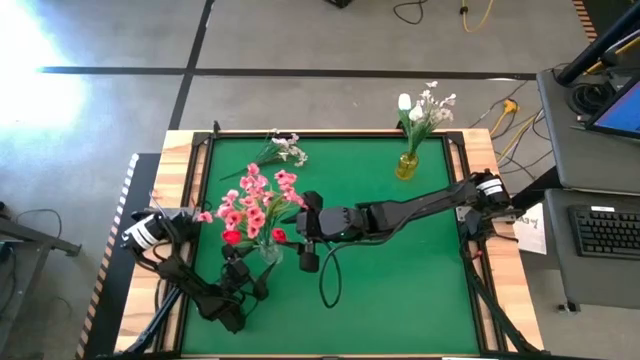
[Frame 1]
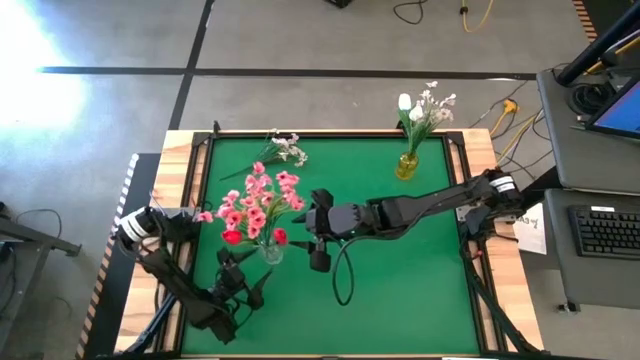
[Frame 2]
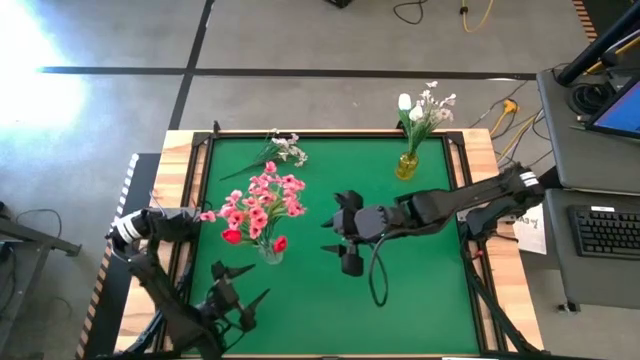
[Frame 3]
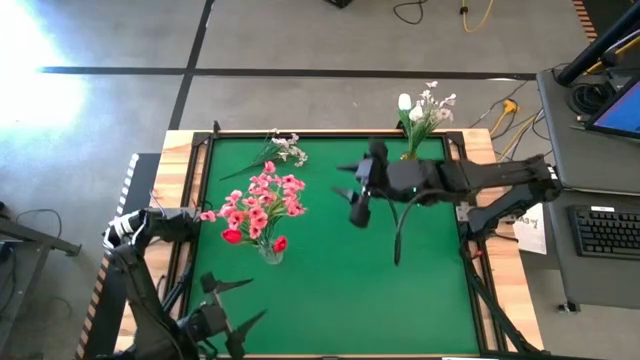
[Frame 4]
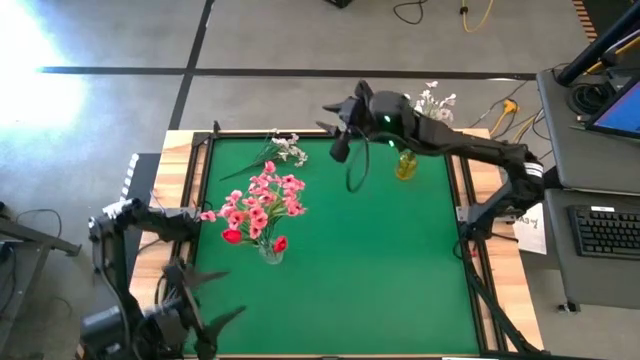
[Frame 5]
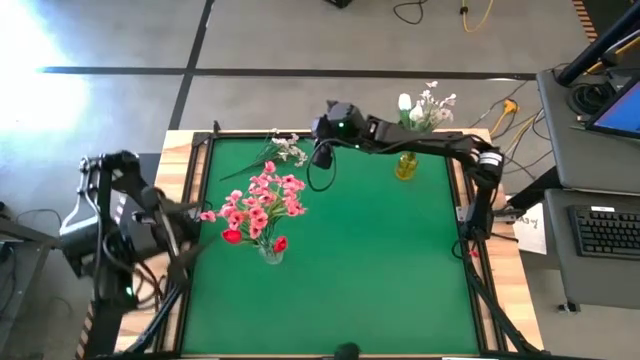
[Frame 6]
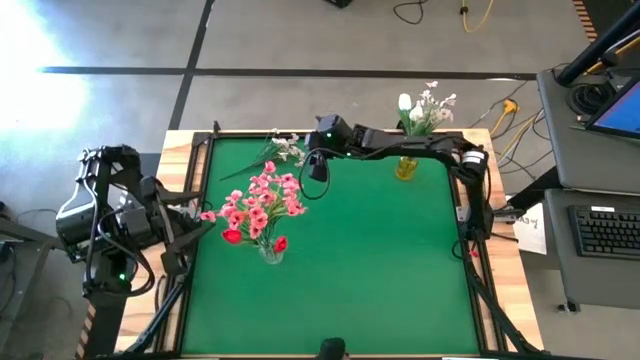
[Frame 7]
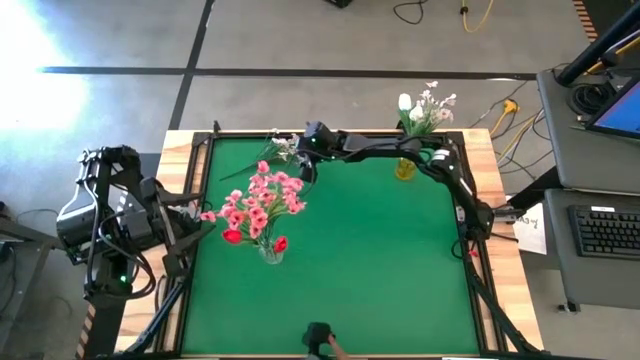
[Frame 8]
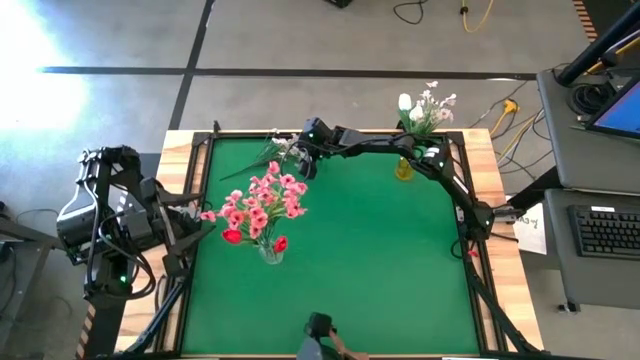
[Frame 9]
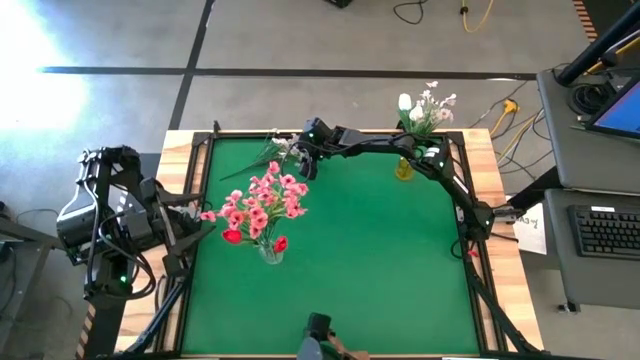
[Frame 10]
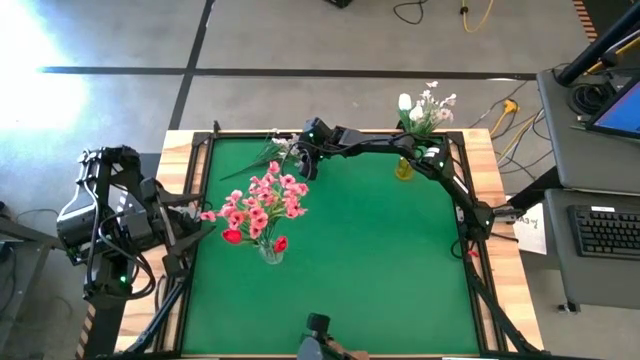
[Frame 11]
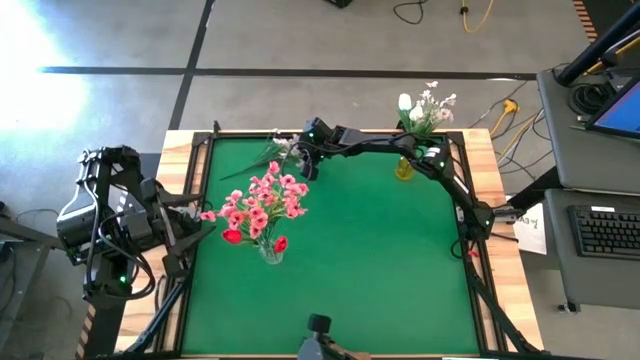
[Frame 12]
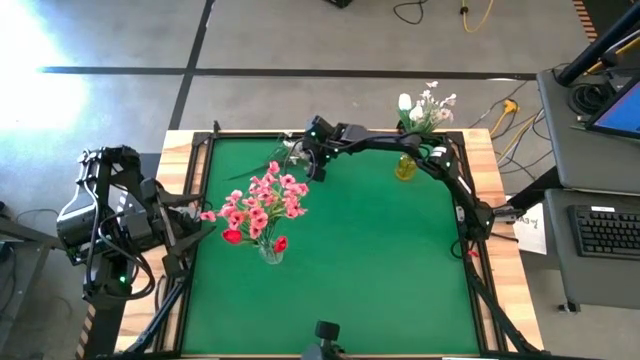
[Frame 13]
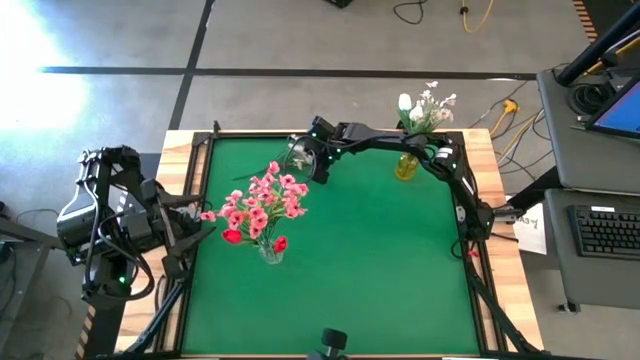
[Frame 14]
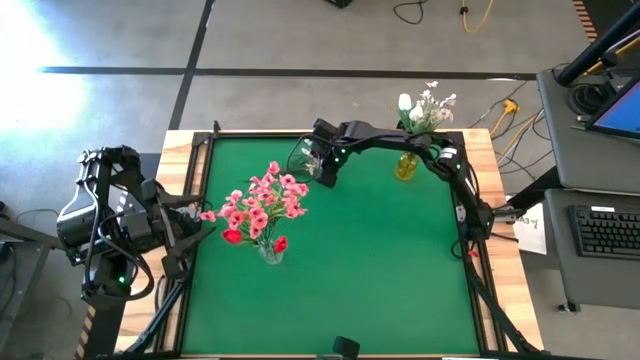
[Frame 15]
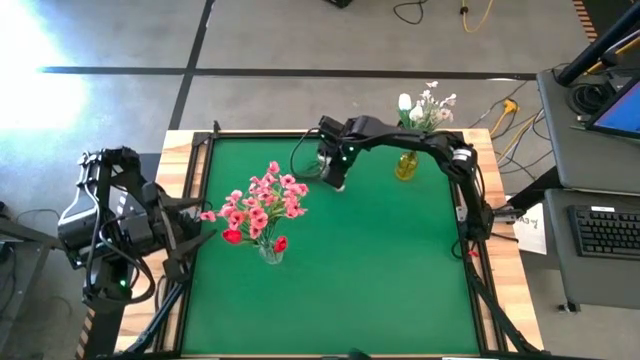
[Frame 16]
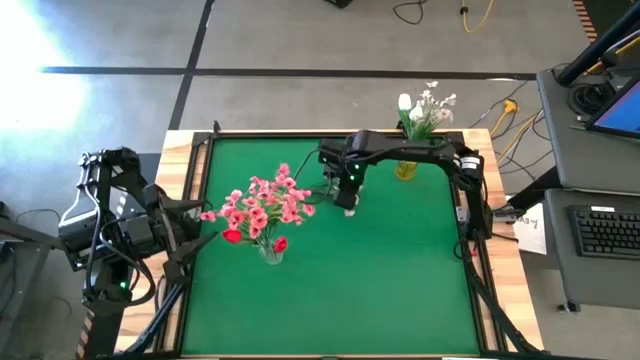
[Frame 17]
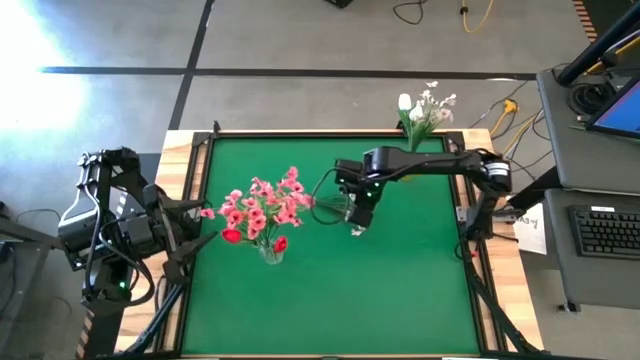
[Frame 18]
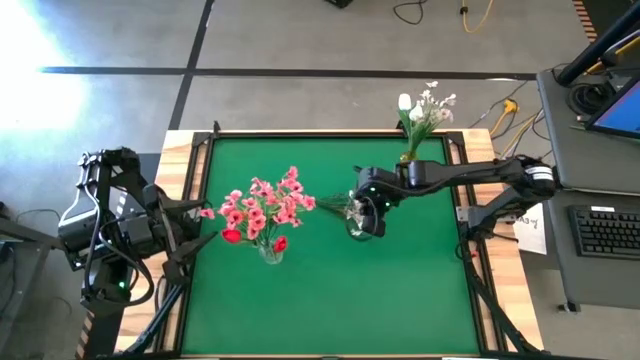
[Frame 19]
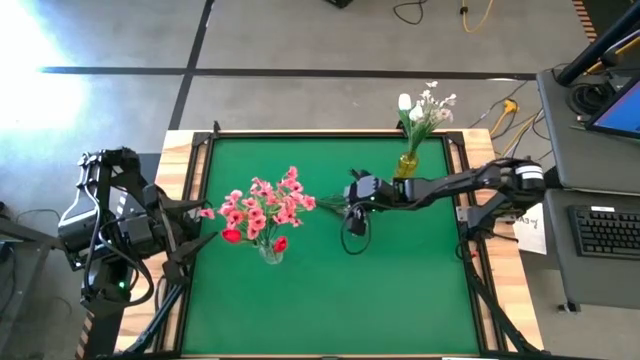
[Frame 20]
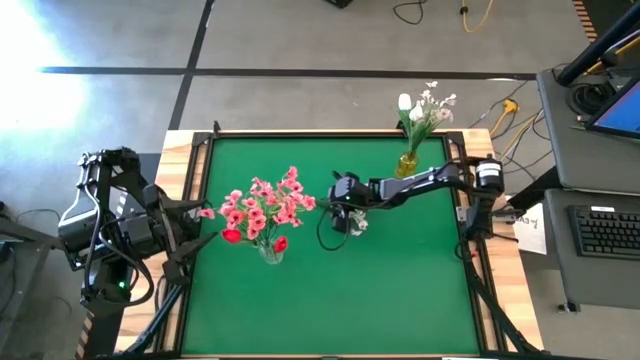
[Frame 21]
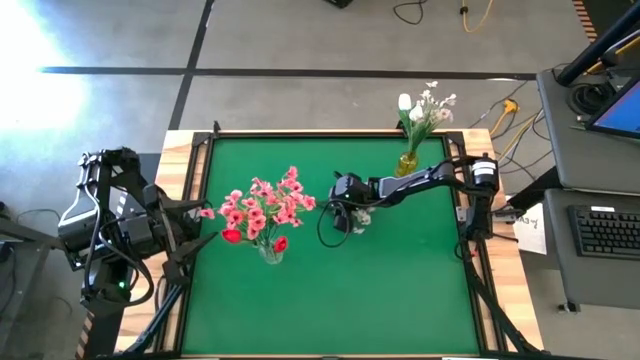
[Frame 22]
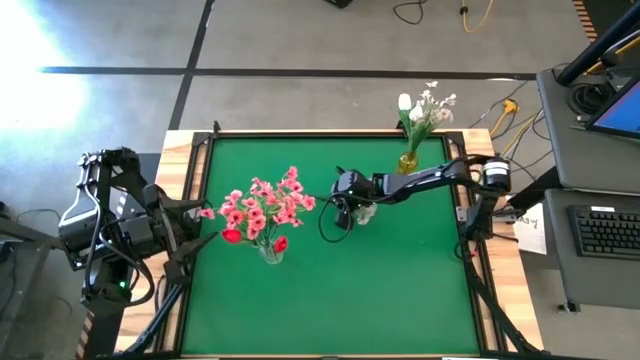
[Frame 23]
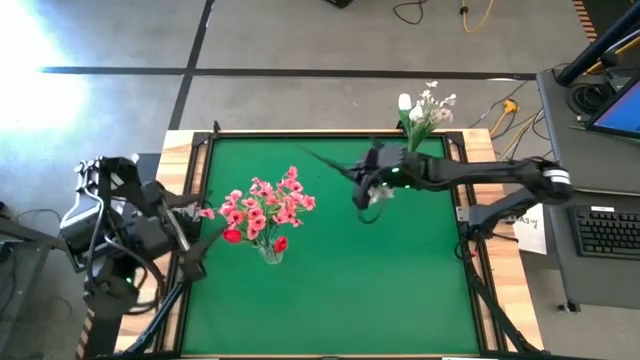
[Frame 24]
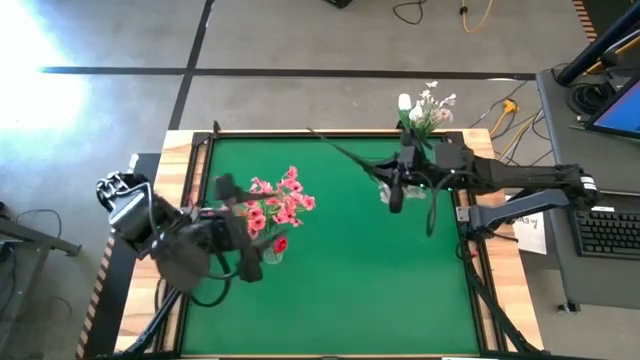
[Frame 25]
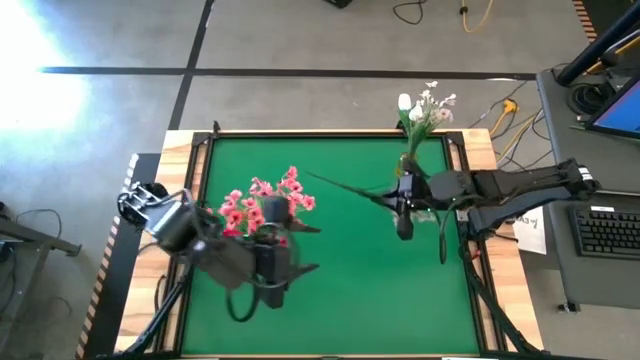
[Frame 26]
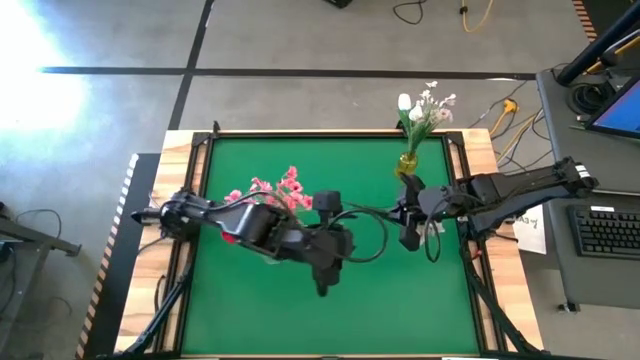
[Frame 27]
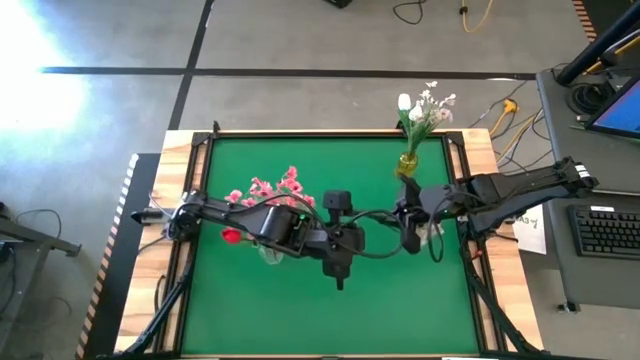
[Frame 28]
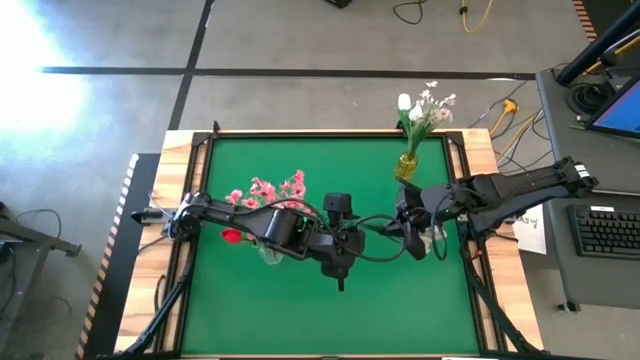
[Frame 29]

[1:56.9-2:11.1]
Task: Sort flowers into vase by color
Put the white flower into the transparent vase

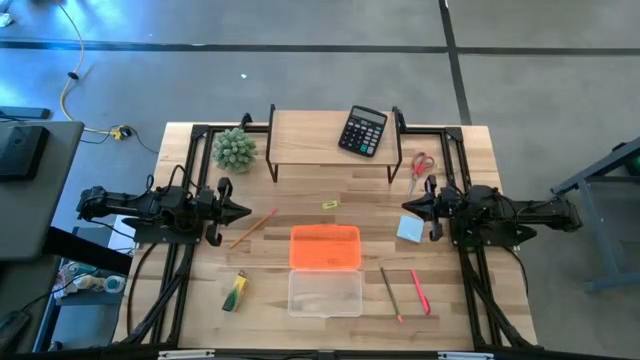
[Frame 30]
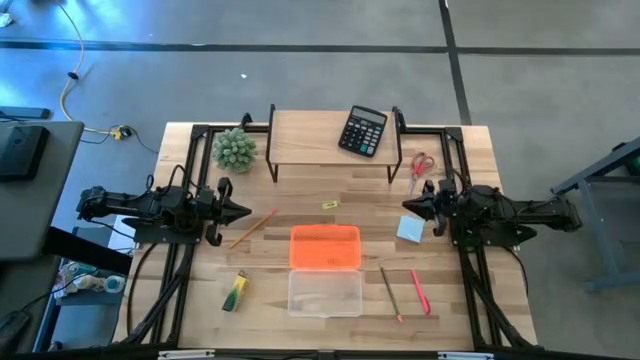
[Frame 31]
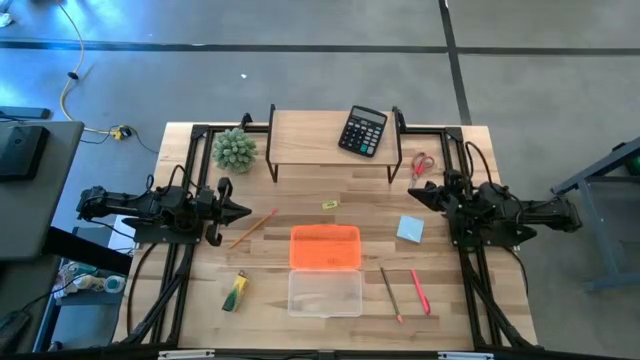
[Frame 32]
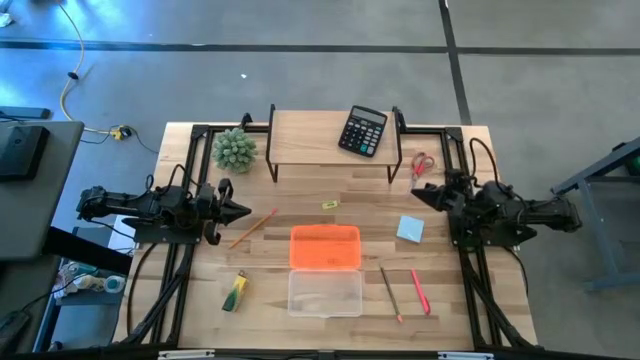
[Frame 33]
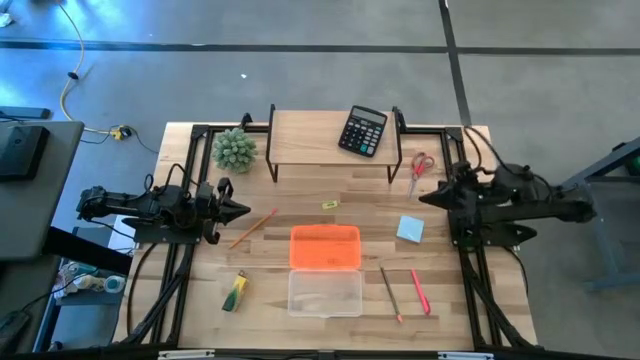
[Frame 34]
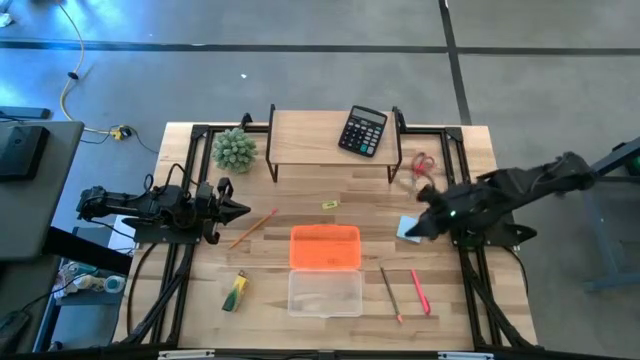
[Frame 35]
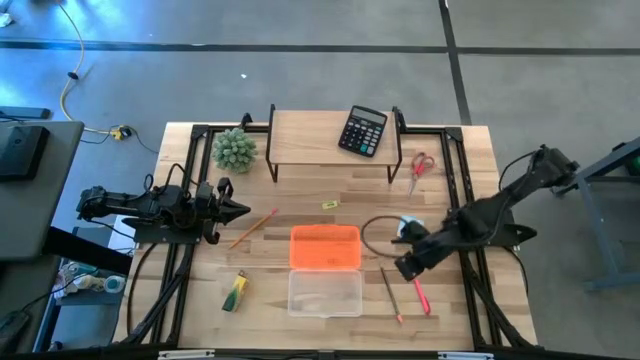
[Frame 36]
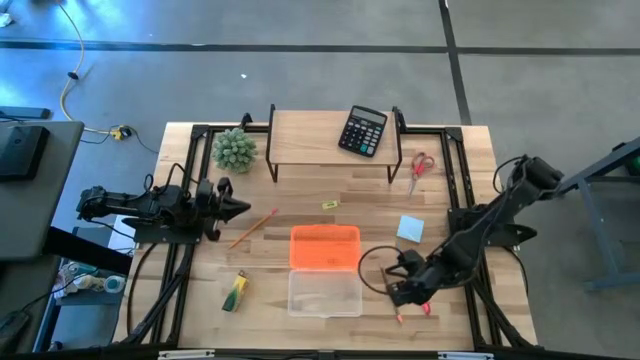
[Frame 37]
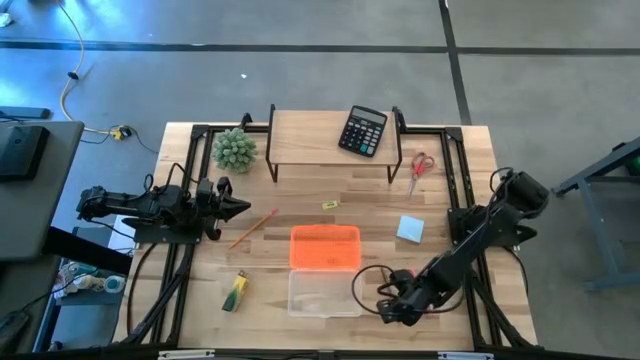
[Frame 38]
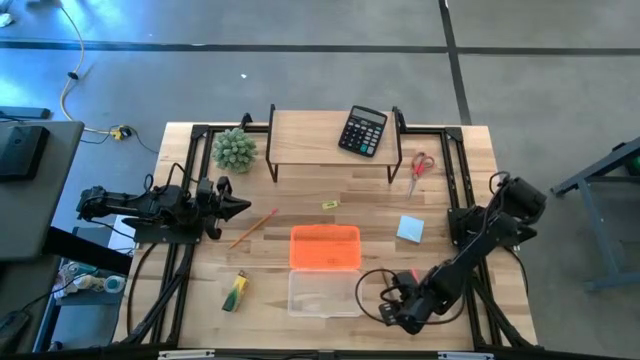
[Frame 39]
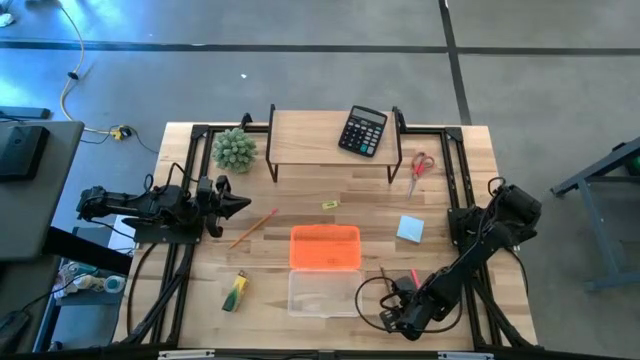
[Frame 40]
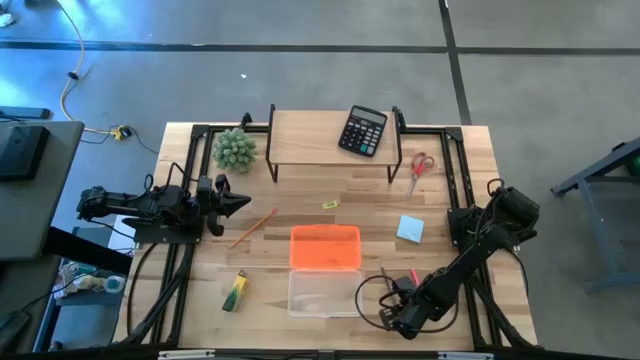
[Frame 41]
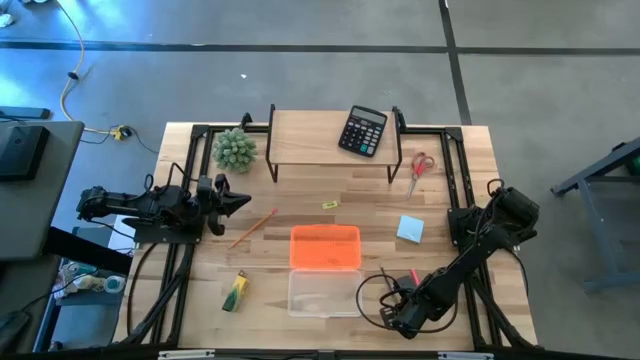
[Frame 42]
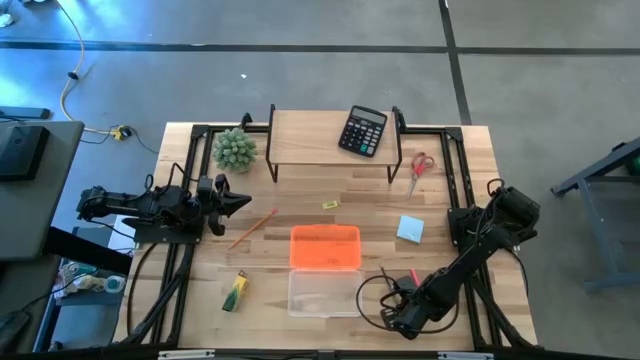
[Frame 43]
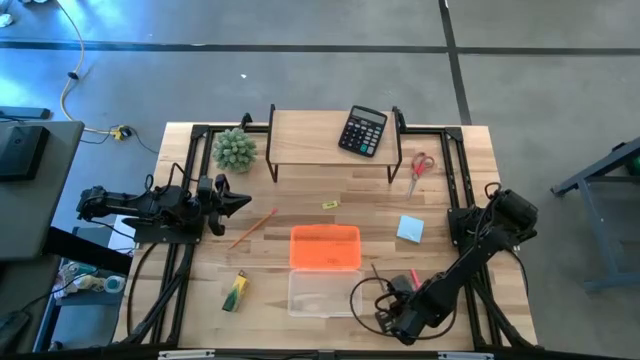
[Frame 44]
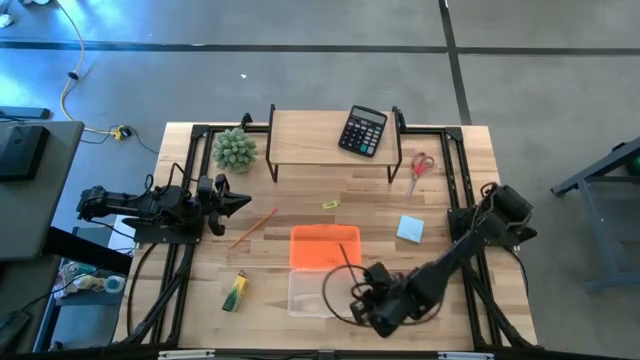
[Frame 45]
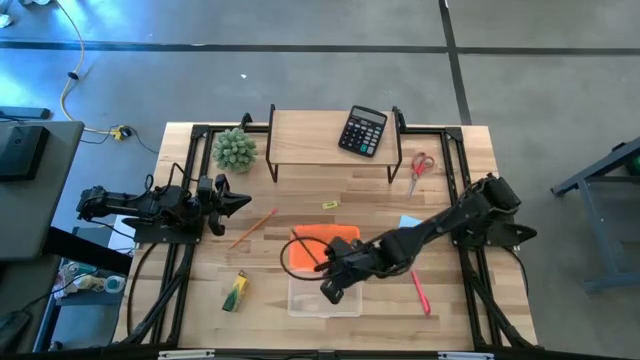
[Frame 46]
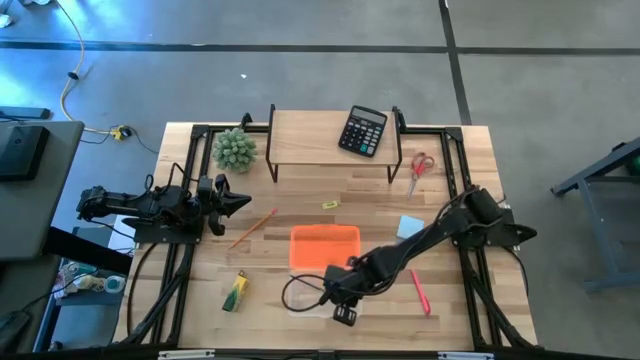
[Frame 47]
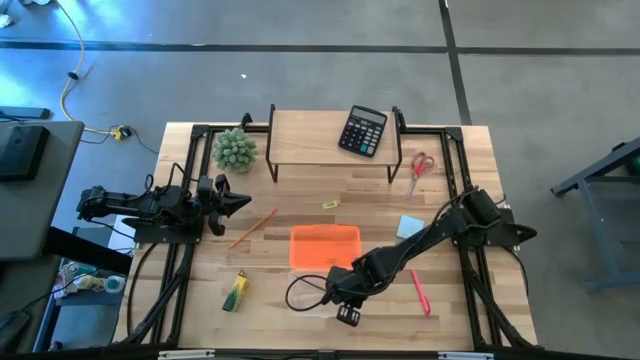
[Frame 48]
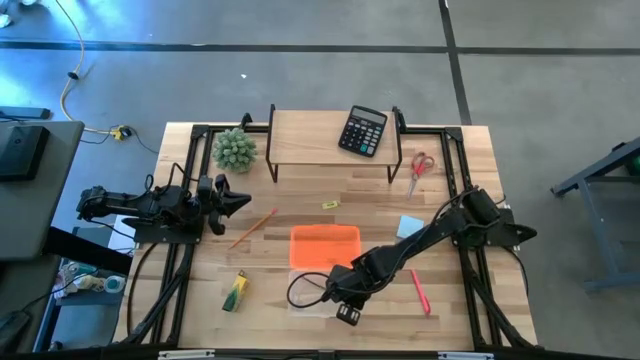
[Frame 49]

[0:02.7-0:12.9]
Task: Pack school essentials
Put the black pencil into the orange supply box
